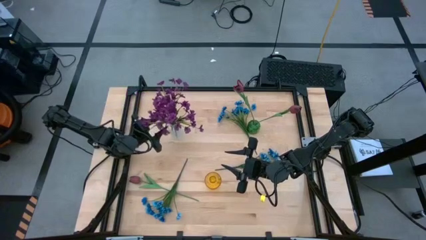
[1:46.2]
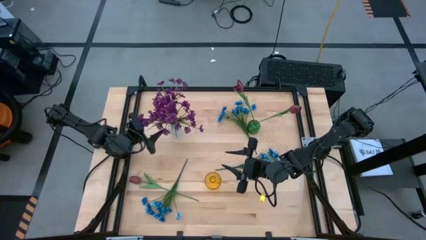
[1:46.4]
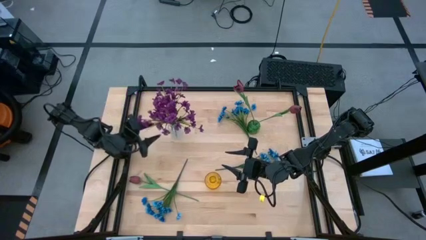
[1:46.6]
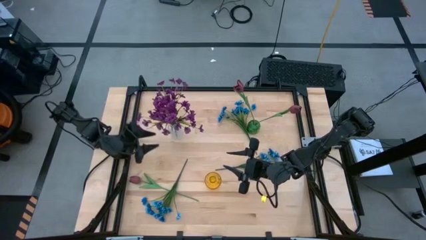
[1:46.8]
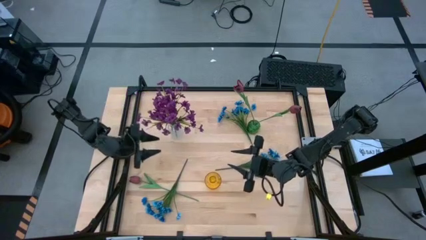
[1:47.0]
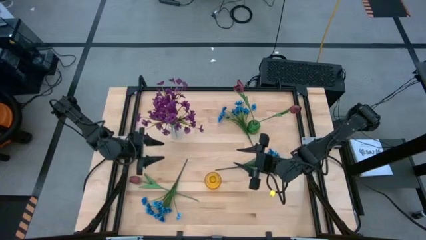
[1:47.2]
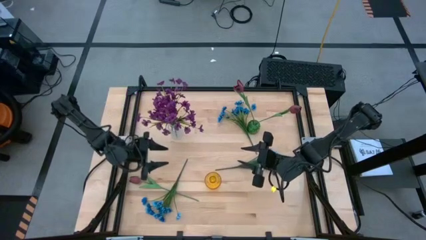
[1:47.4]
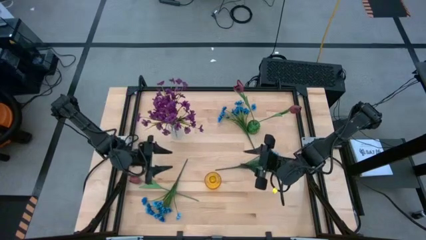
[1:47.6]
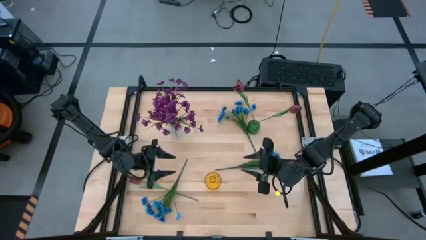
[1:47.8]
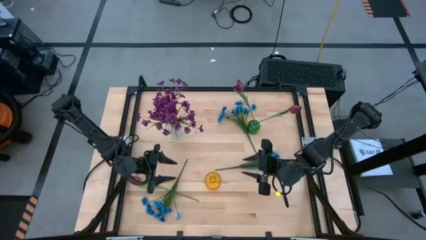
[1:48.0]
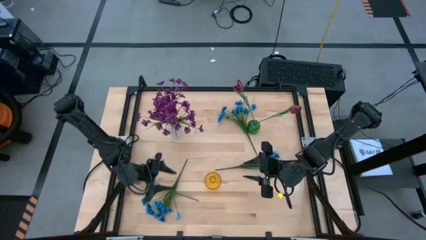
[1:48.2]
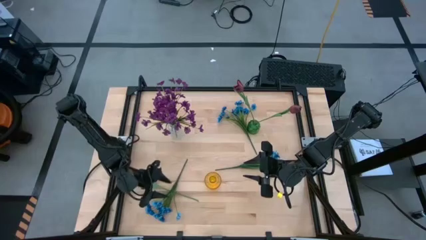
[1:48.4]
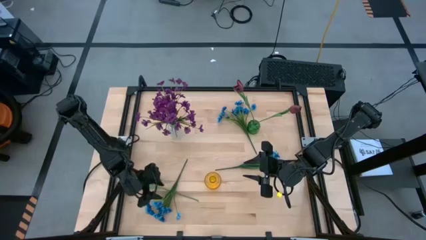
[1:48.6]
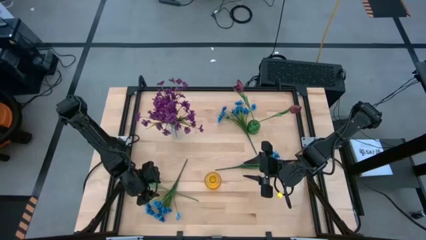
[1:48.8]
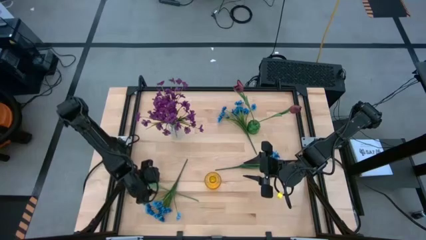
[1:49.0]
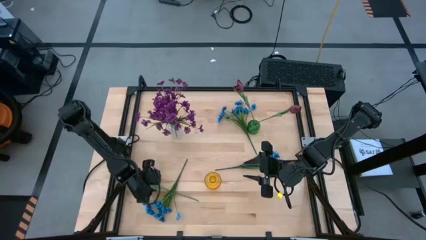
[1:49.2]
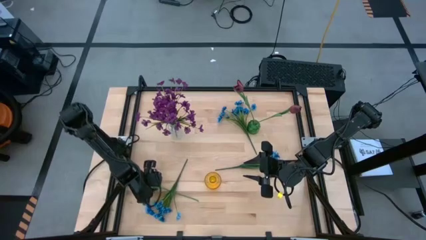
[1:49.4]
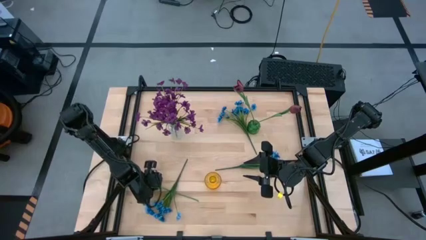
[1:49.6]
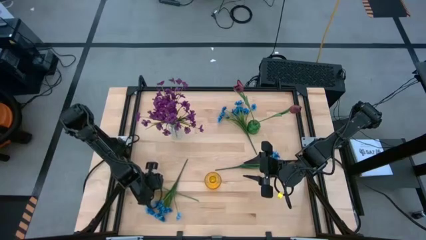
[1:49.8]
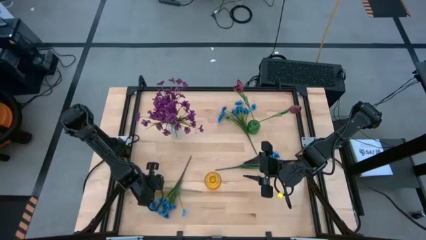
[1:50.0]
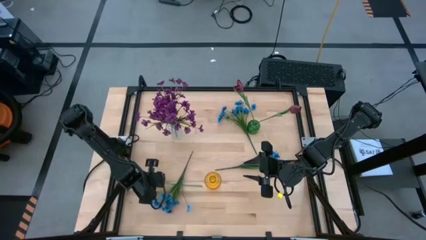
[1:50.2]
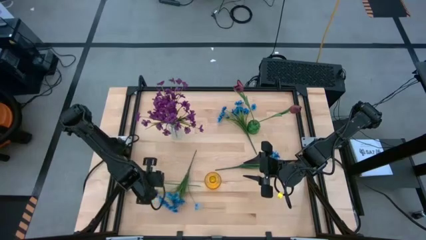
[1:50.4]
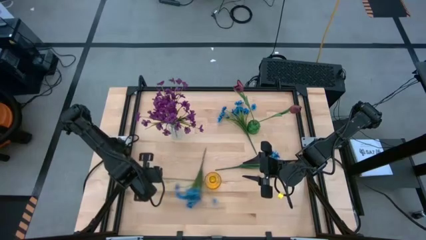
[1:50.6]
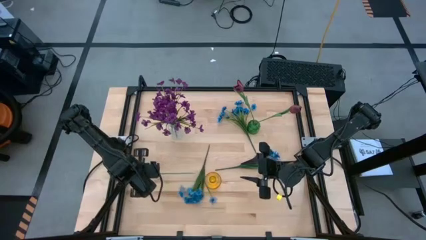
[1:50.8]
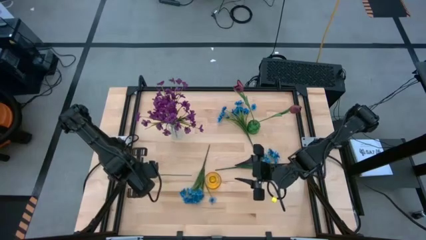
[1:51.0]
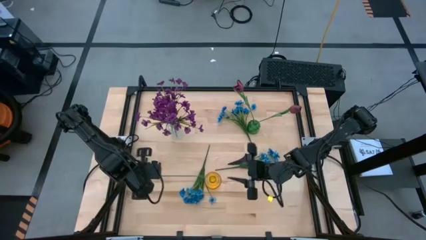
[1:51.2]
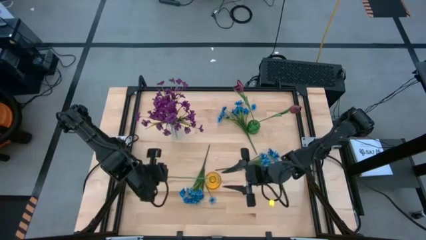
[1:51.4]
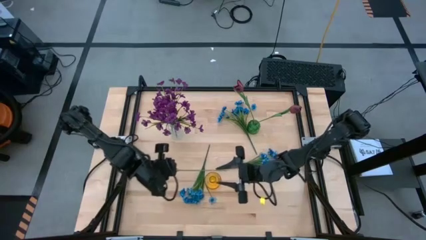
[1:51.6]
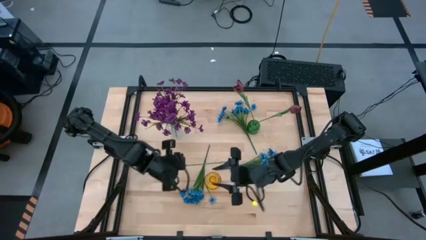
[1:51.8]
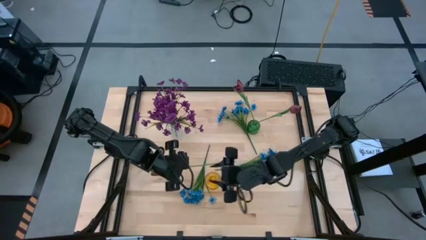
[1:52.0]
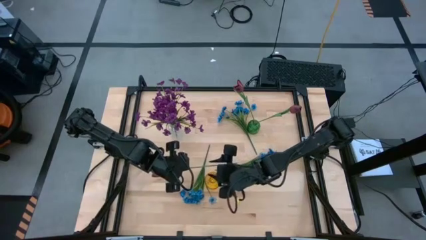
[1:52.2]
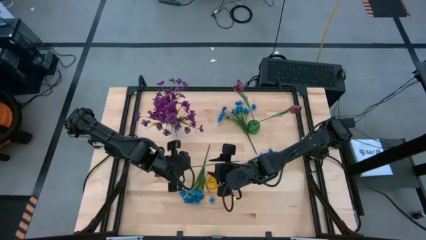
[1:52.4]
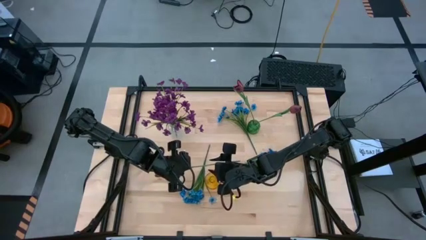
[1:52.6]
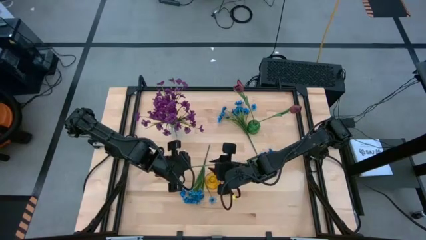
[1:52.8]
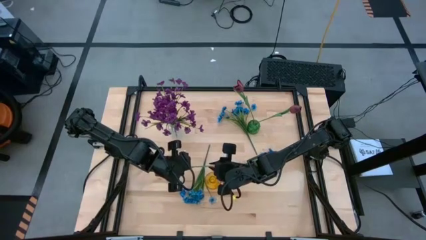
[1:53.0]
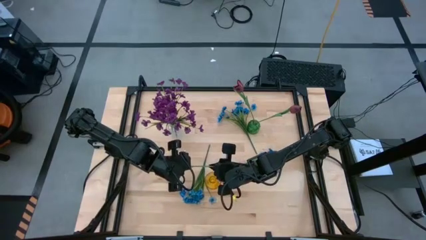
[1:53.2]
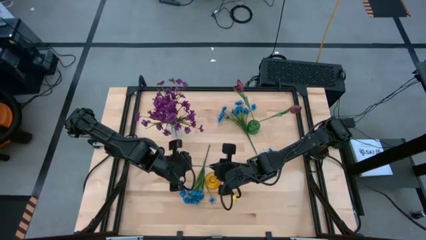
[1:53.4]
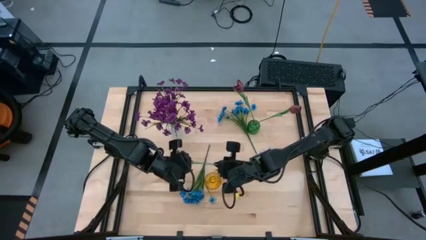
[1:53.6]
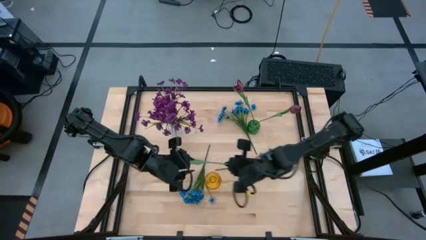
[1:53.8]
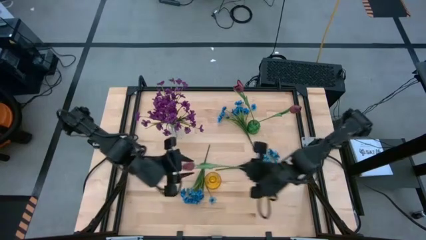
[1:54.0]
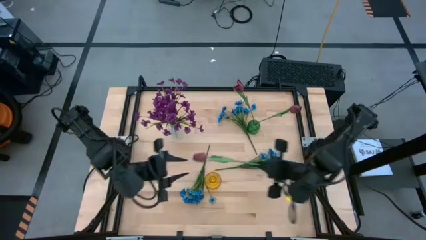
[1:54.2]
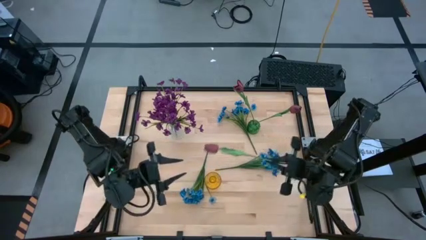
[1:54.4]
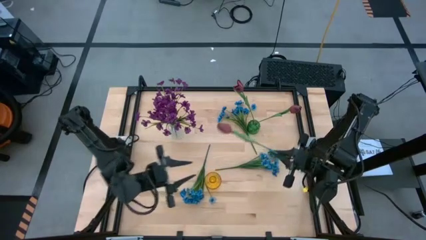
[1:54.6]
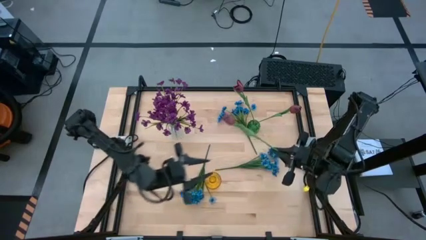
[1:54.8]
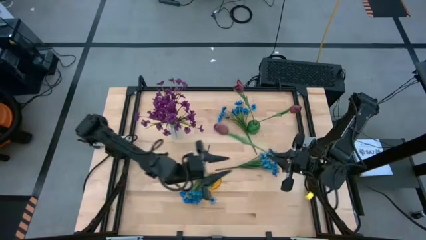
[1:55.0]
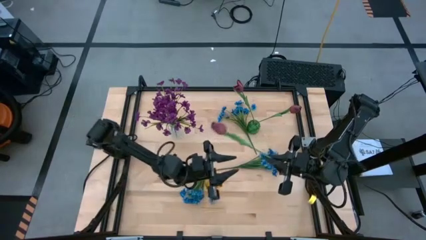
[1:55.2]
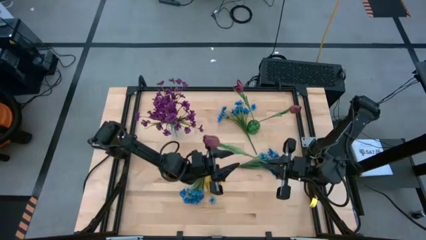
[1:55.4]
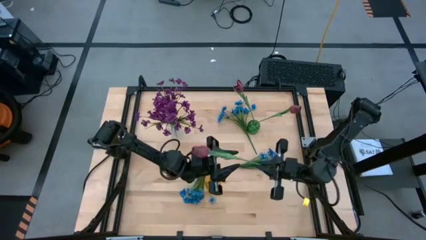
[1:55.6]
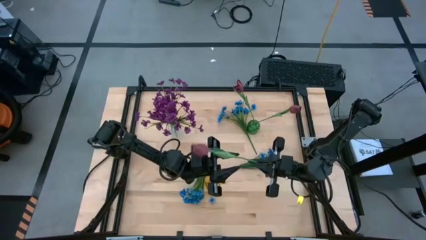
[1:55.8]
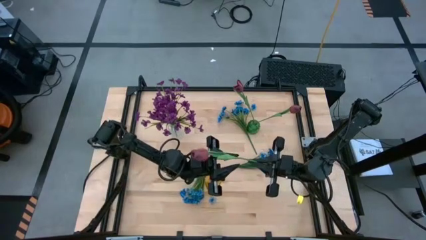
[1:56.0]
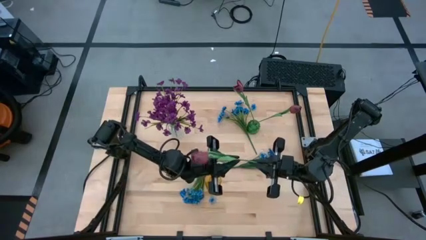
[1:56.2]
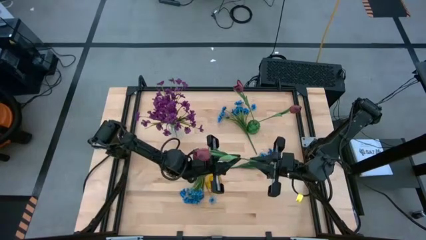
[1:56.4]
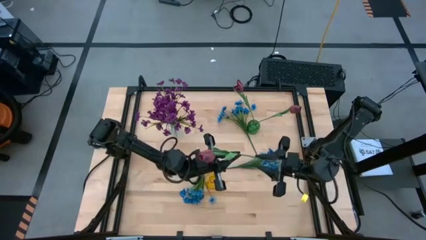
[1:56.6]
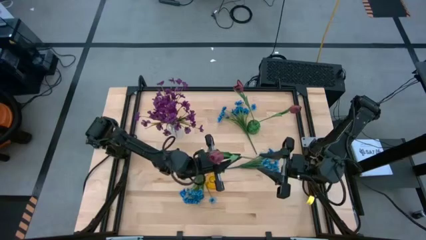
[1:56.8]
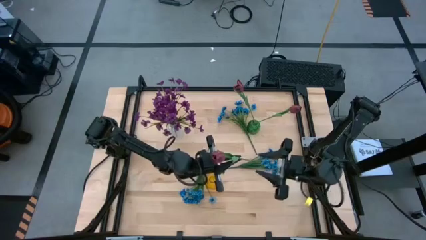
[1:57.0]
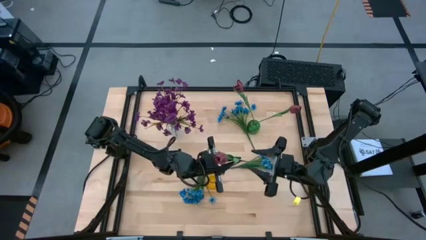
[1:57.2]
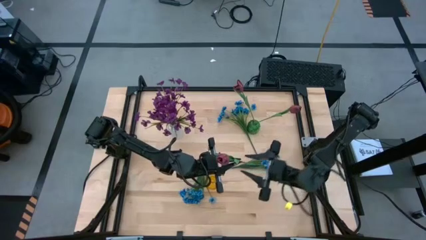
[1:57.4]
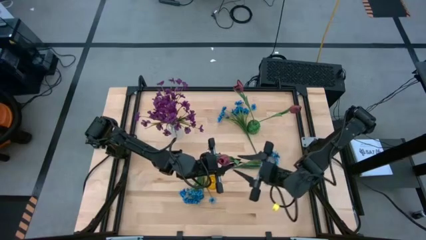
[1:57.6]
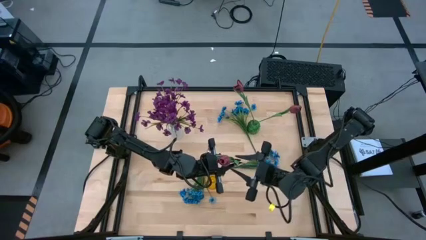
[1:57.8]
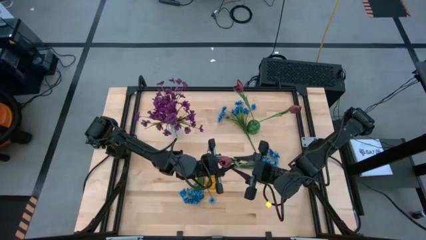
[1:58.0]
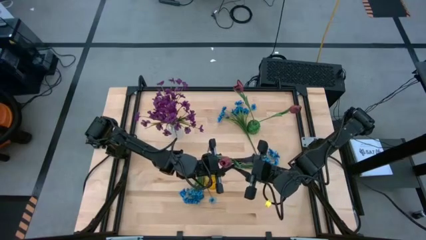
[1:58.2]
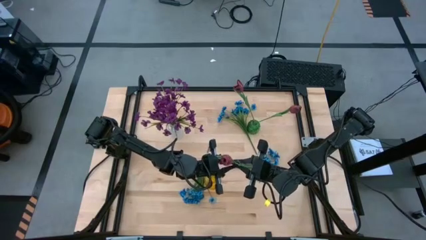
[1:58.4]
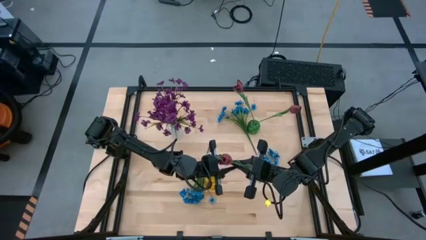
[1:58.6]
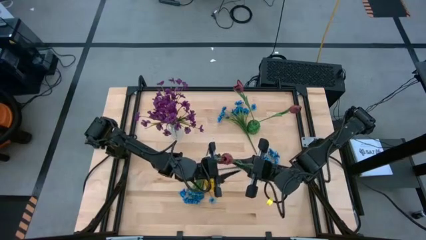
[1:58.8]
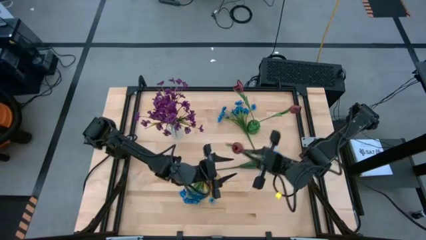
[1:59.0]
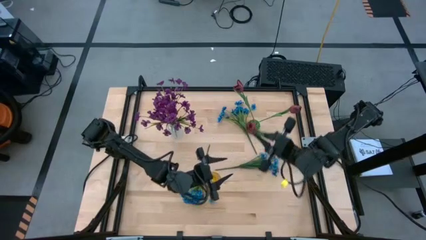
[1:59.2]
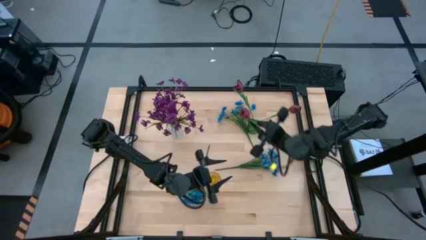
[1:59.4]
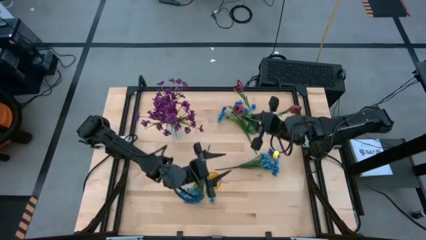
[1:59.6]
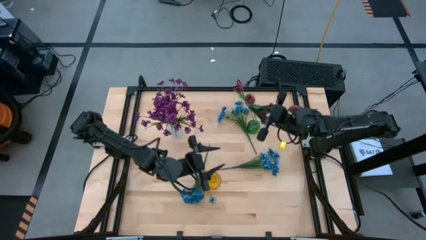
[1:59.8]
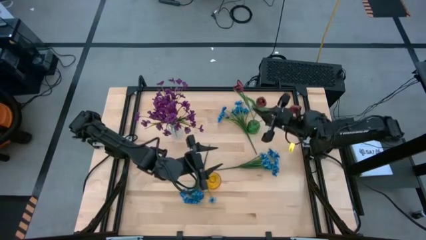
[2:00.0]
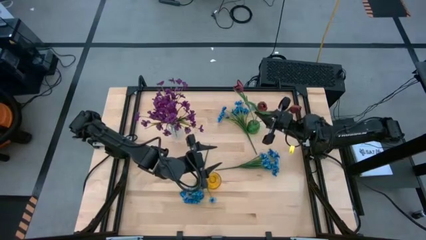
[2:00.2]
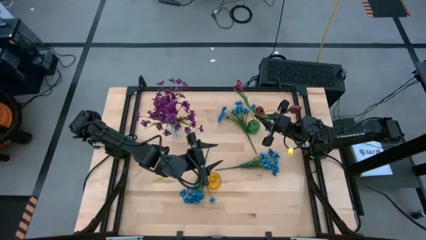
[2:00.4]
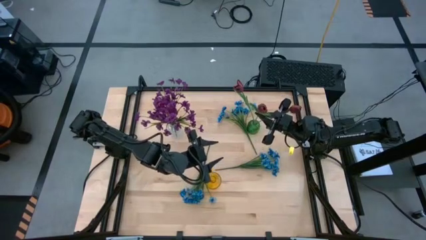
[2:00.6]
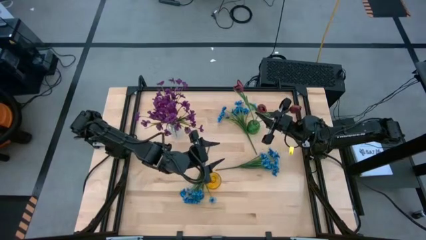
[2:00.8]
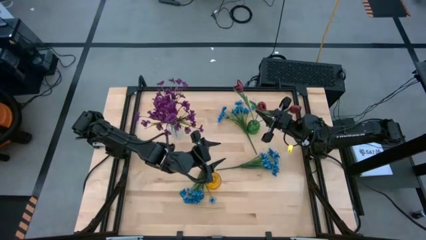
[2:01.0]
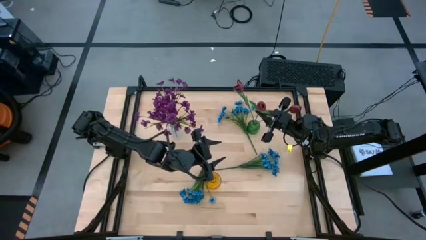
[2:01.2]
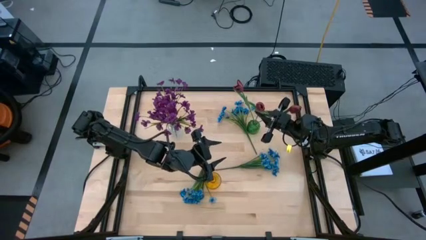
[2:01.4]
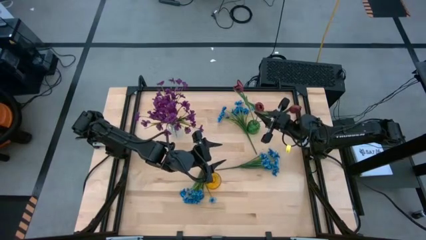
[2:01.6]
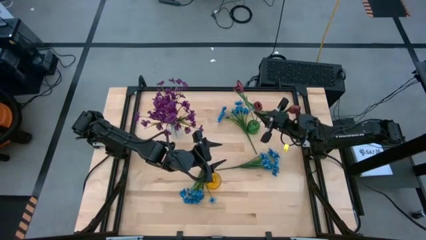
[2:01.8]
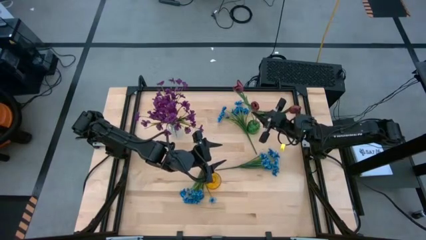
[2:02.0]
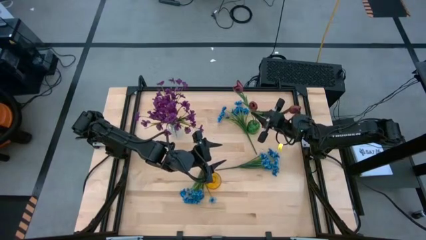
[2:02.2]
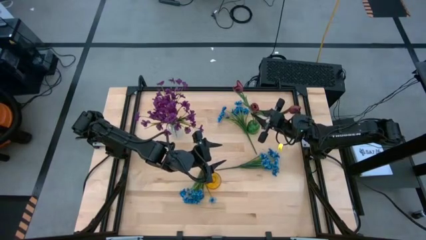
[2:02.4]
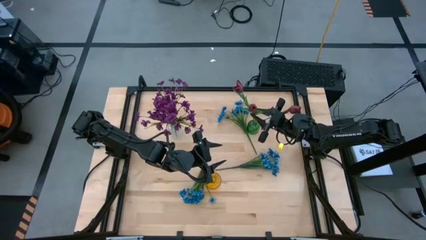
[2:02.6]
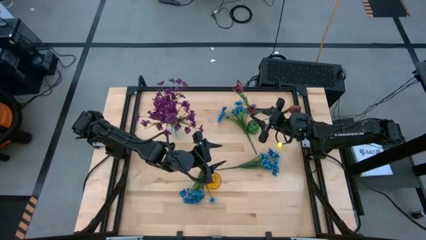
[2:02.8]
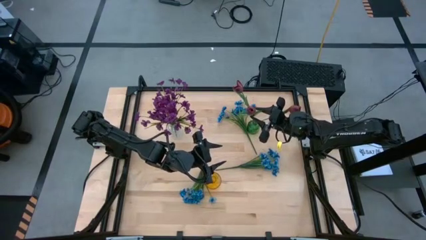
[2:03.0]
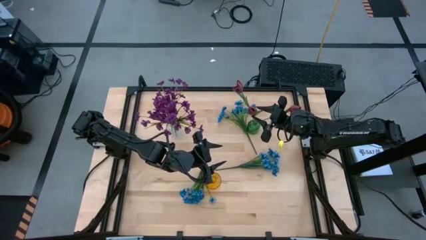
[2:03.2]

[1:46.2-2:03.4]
Task: Sort flowers into vase by color
Put the red flower into the green vase
